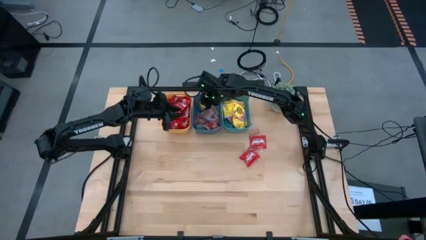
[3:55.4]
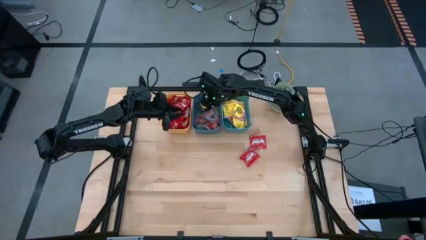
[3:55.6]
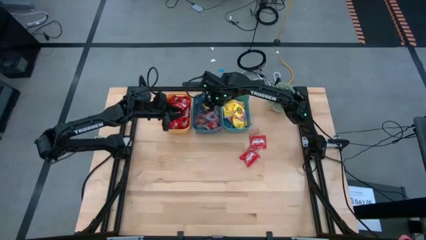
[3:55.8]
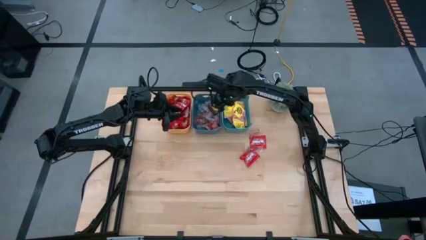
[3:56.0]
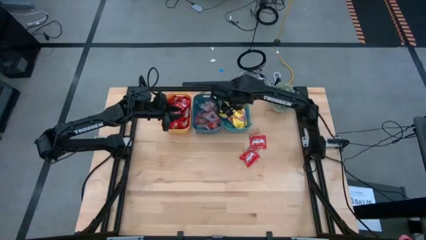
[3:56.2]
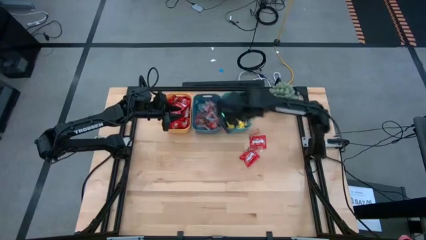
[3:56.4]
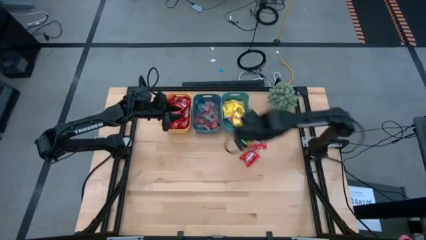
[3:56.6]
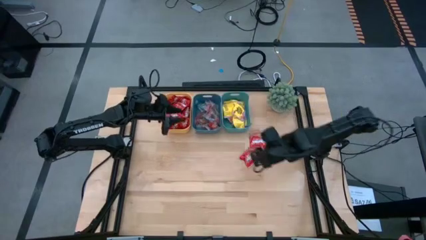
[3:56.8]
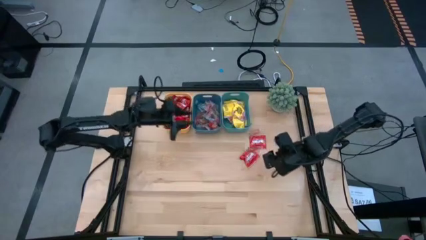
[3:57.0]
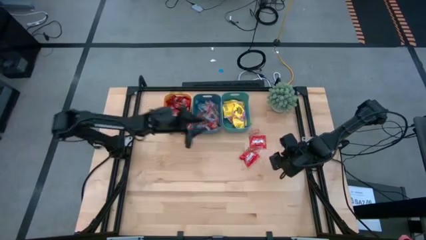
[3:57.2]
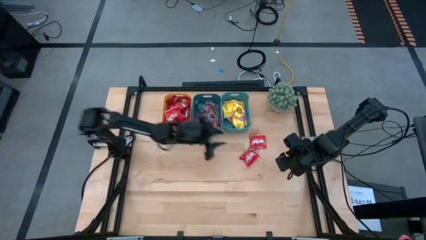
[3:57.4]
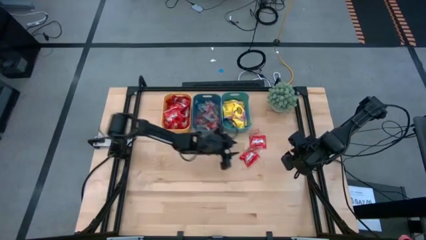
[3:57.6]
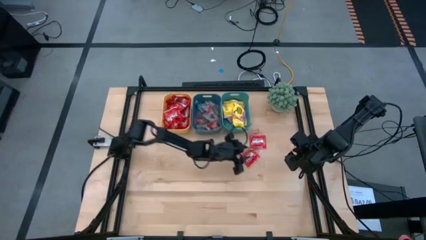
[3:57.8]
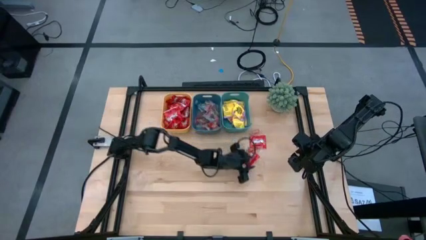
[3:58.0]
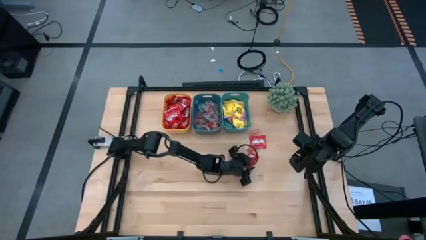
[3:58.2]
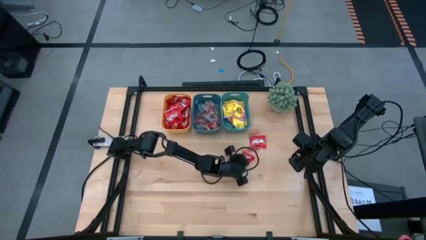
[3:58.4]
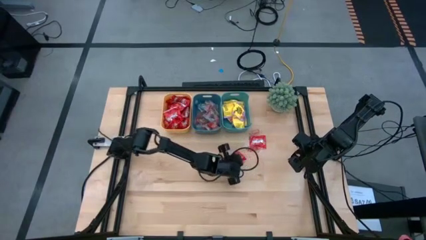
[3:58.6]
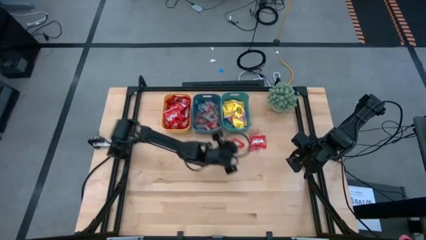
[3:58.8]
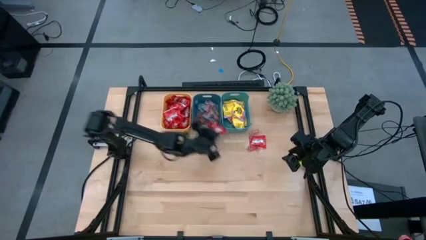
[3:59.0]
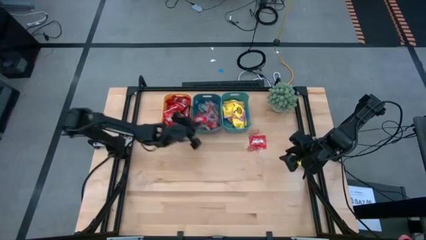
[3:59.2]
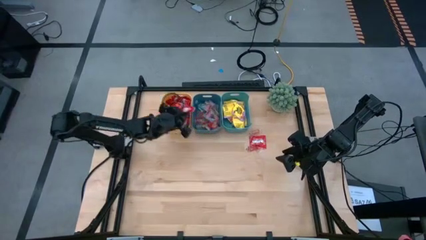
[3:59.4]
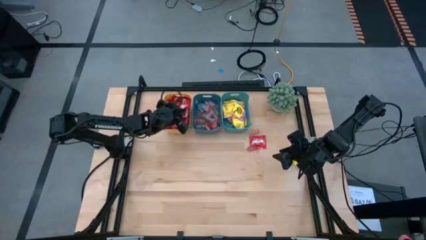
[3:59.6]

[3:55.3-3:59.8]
Task: Sort candy
Put the red candy into the yellow bin

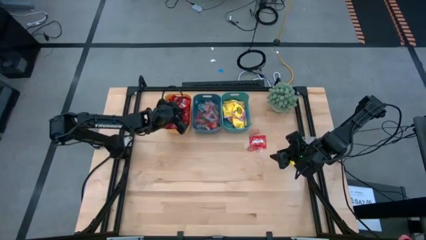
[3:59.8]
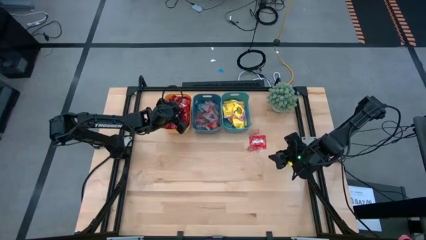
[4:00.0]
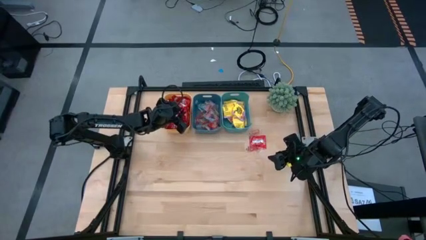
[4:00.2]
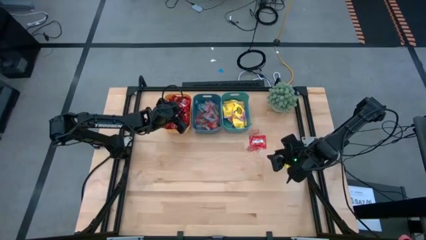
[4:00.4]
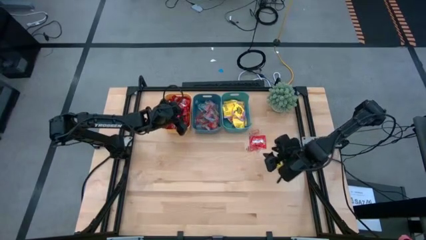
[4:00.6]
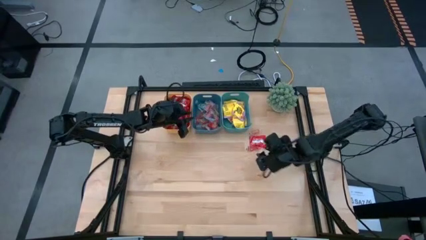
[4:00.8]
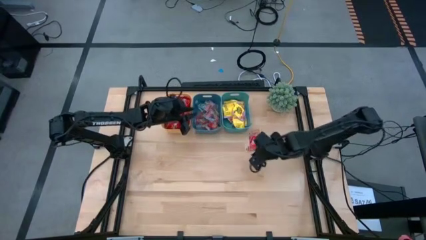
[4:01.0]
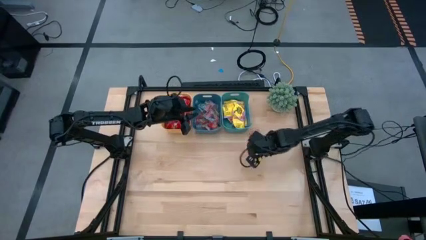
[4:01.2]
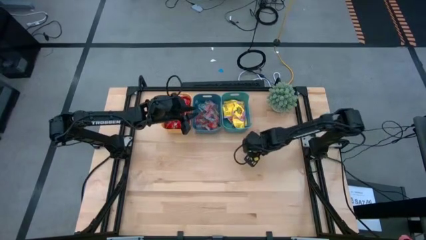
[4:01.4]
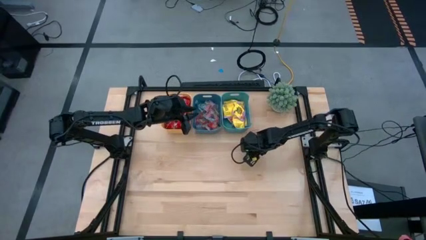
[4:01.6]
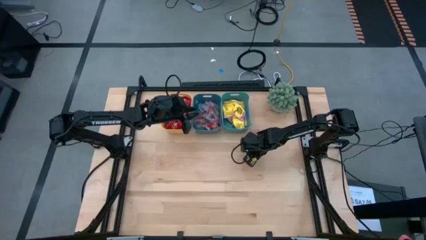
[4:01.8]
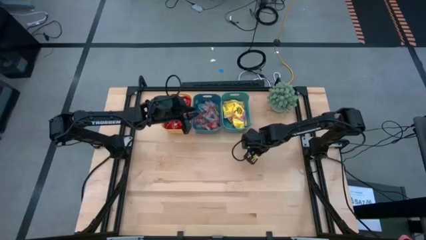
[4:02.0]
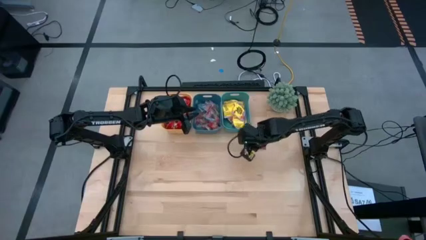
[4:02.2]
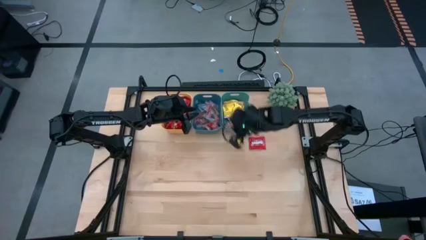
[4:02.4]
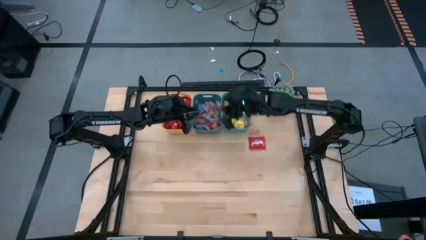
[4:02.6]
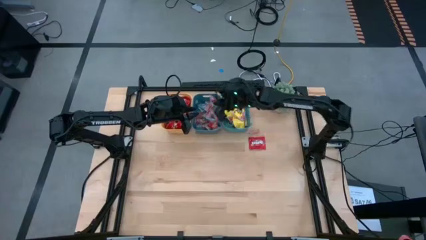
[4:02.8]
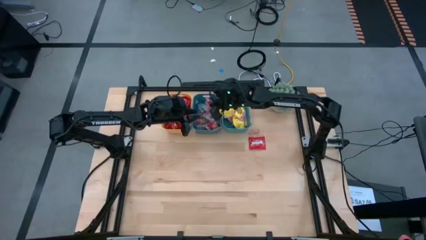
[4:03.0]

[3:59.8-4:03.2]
Put the transparent red candy into the blue bin

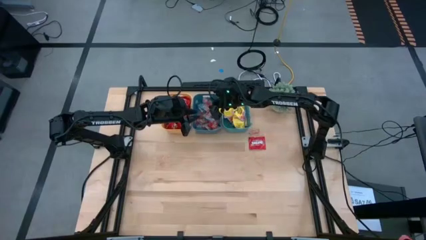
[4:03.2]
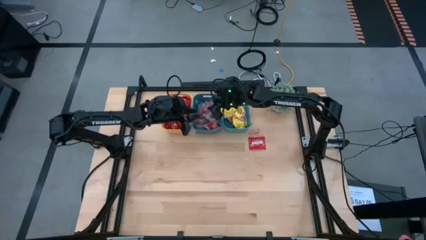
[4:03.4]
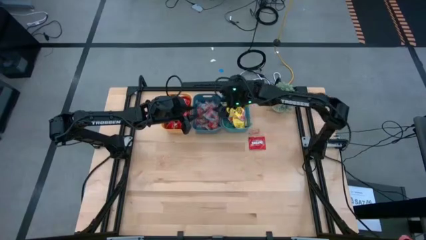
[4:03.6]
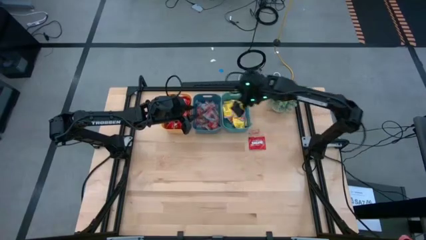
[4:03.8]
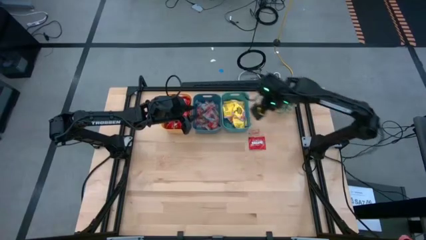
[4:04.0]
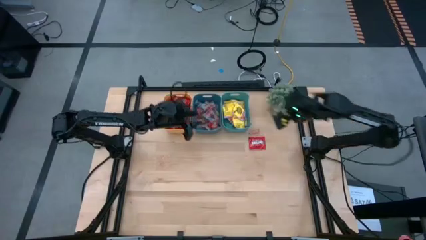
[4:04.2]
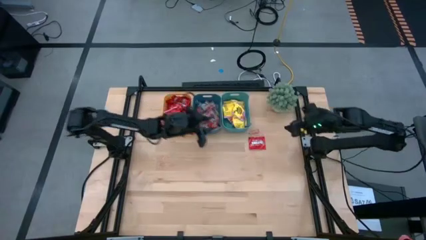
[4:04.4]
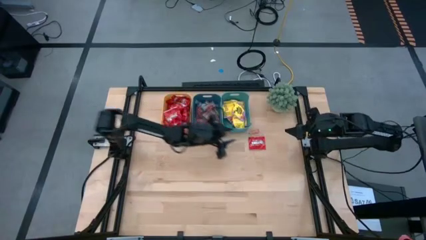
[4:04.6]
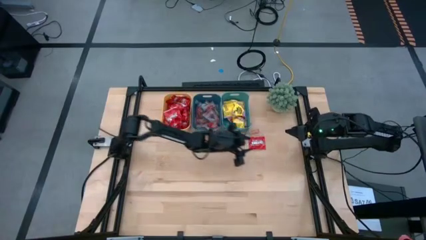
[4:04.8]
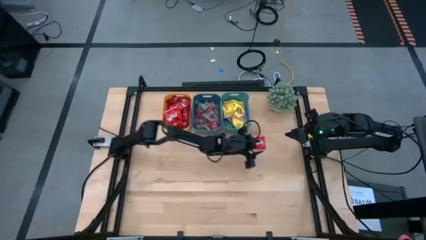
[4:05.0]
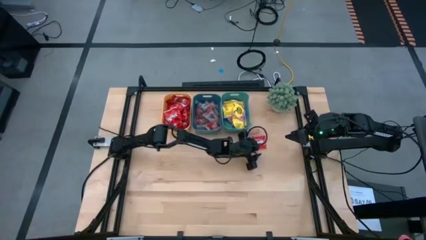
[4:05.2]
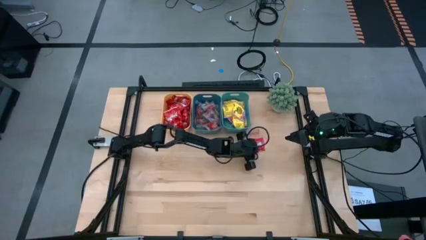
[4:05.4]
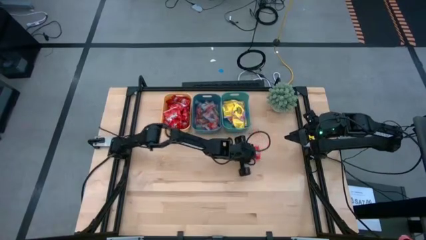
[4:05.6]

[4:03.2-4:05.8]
Put the red candy into the yellow bin

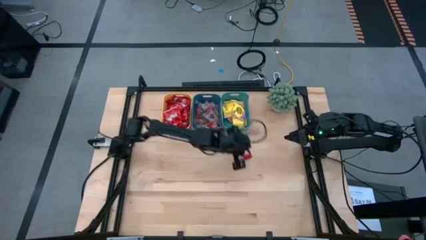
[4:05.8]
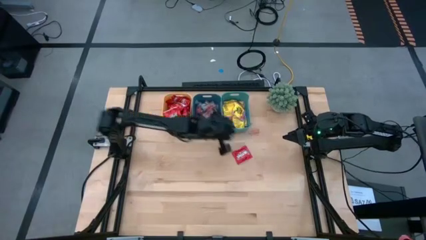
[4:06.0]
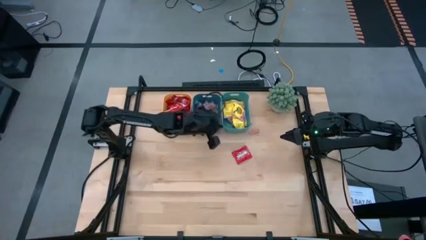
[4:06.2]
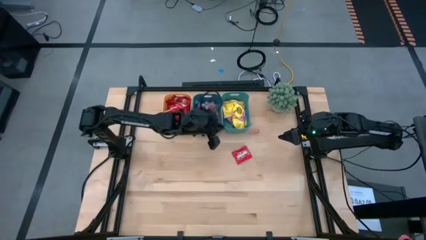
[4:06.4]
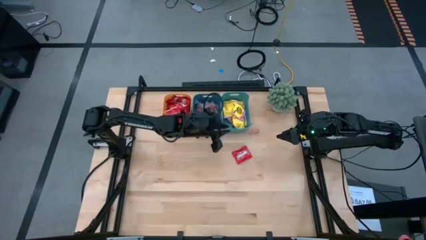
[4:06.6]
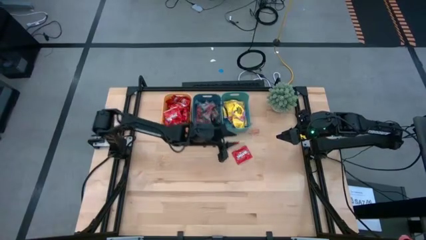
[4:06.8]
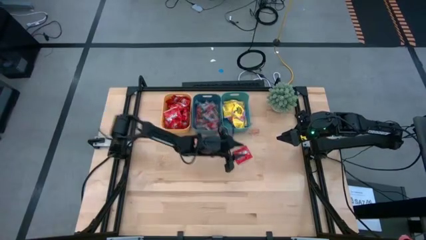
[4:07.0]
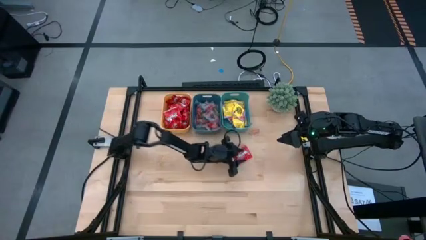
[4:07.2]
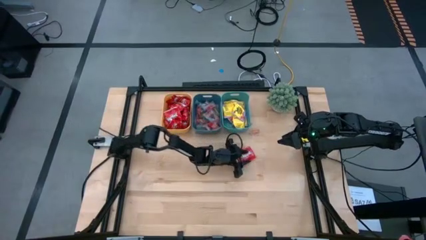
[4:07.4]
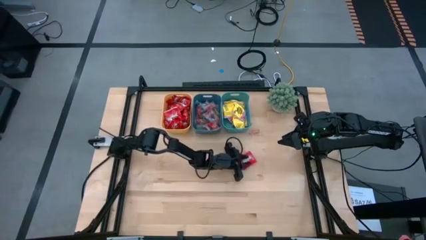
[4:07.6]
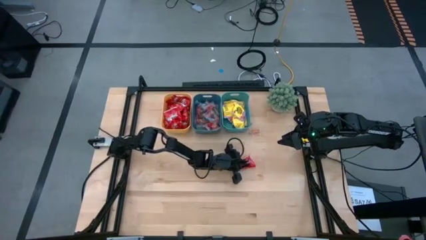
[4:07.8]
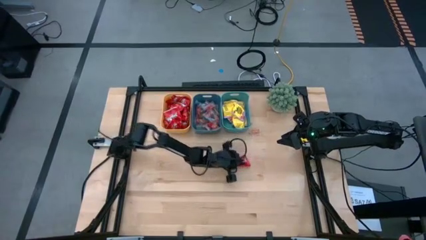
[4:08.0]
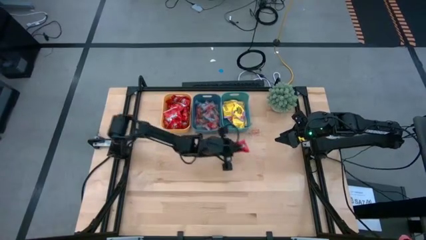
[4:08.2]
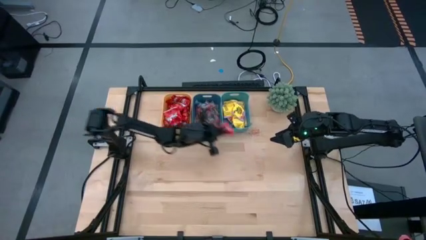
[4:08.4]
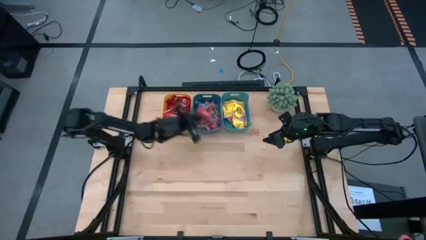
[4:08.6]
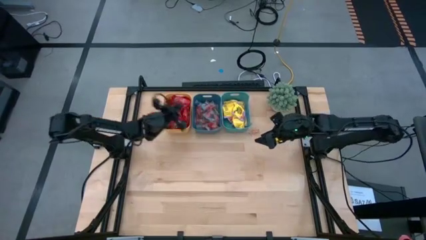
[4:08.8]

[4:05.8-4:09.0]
Put the red candy into the yellow bin

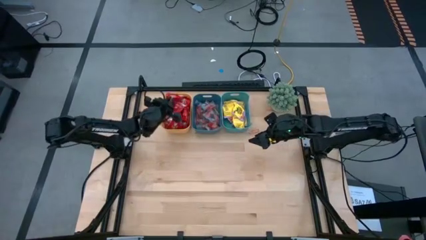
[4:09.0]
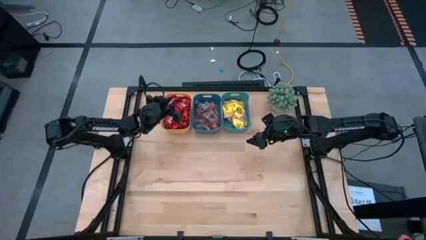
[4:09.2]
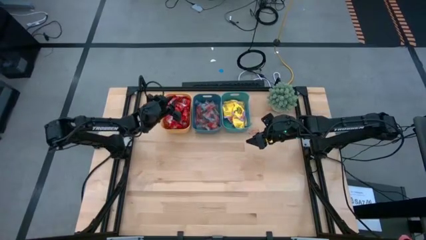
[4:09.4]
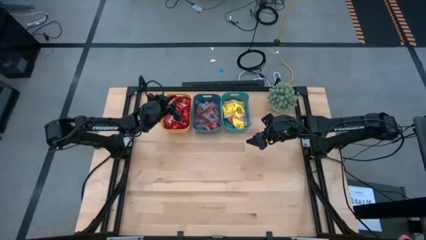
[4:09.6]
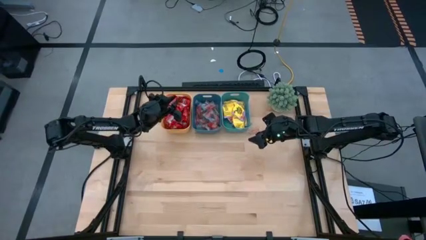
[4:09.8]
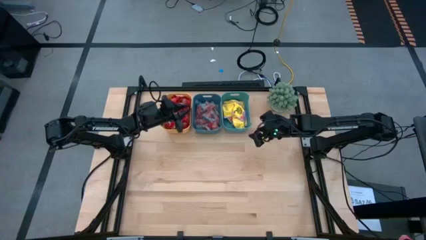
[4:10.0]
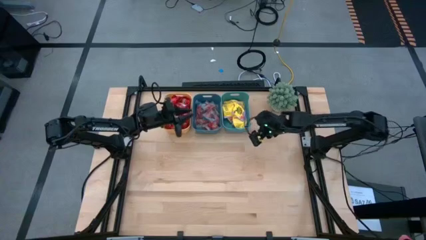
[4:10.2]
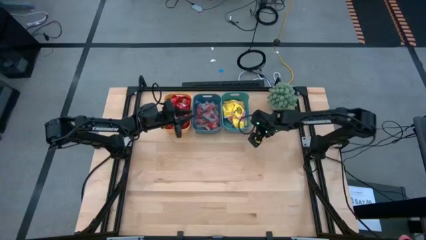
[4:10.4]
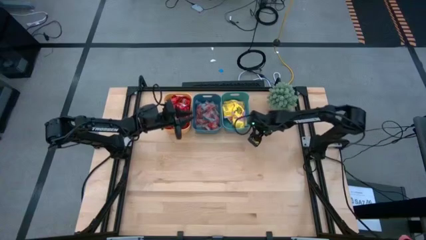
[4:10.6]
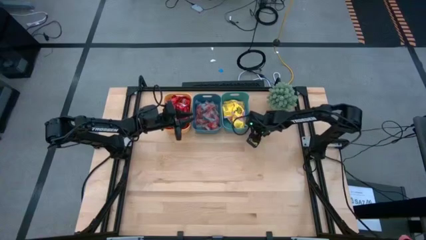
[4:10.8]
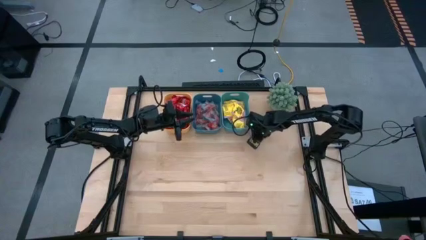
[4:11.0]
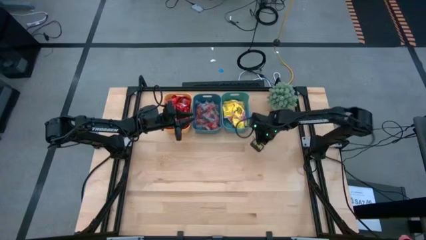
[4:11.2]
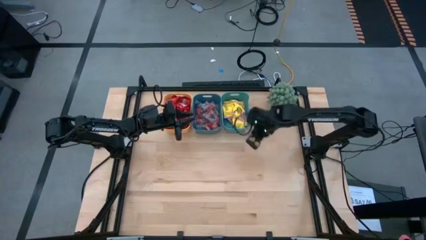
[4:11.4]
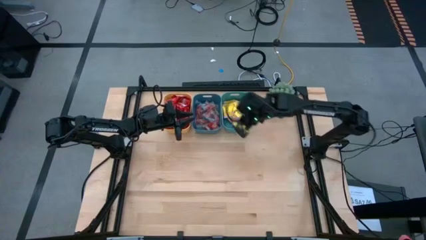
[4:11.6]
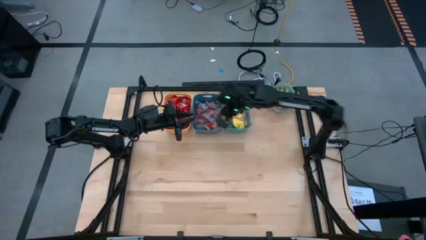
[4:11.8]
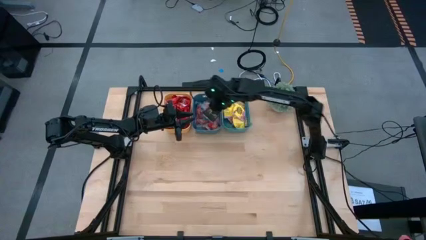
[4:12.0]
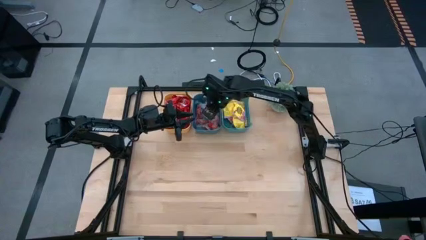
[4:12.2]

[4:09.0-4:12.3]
Put the transparent red gummy into the blue bin
